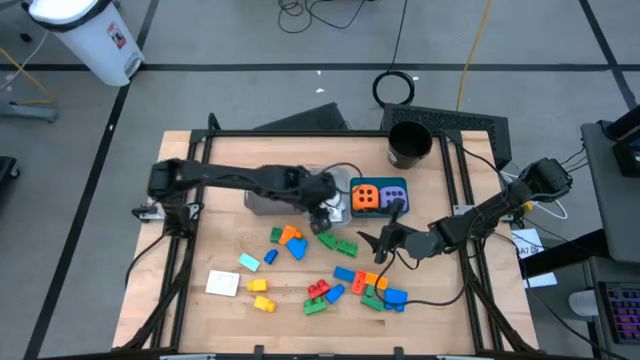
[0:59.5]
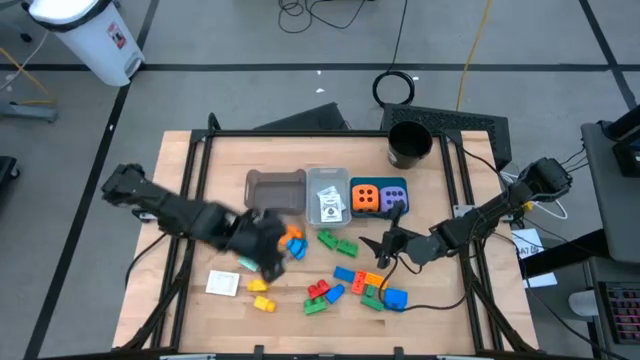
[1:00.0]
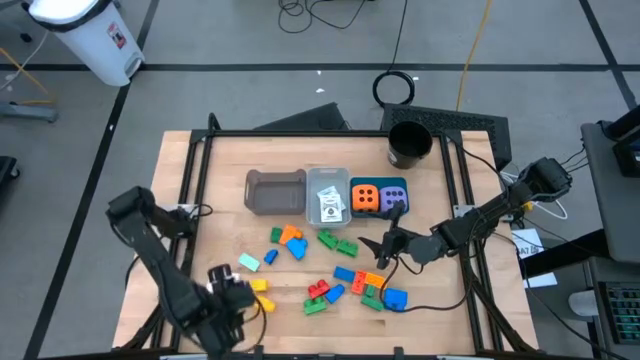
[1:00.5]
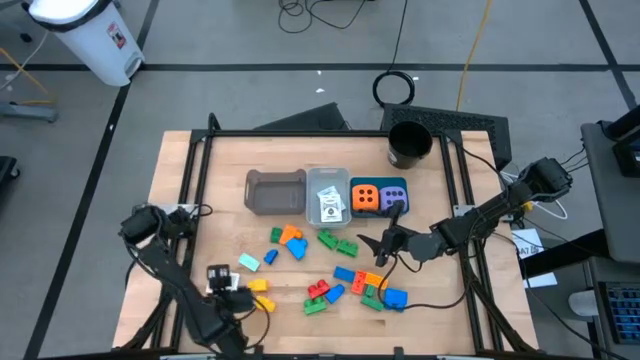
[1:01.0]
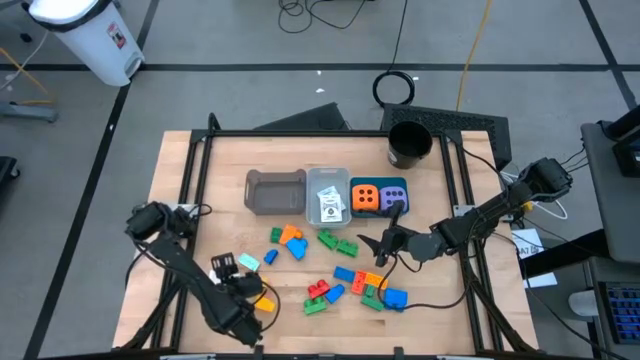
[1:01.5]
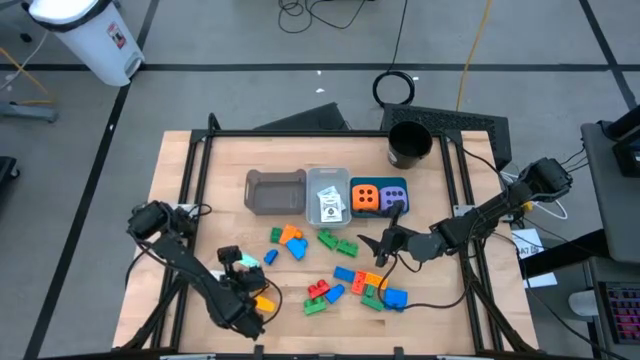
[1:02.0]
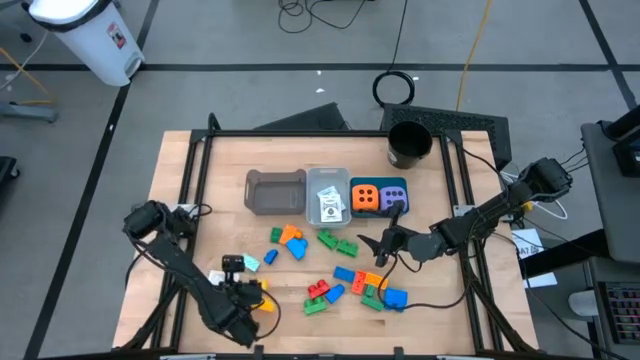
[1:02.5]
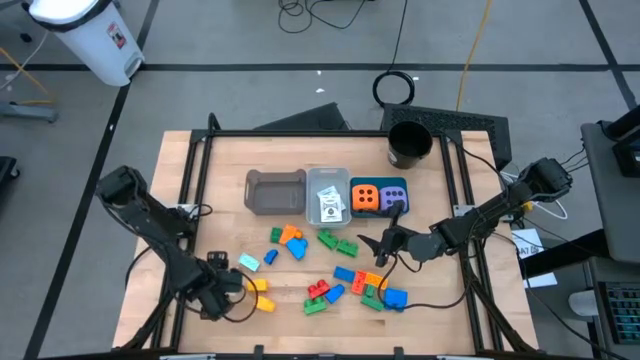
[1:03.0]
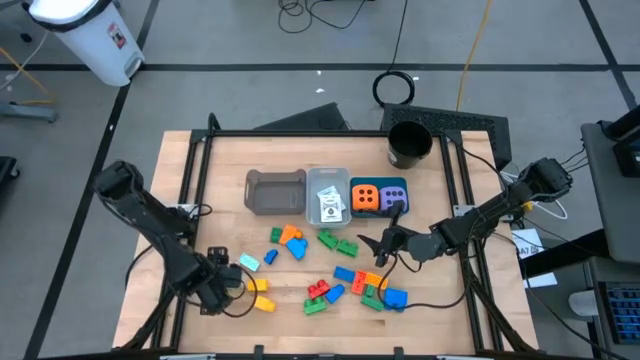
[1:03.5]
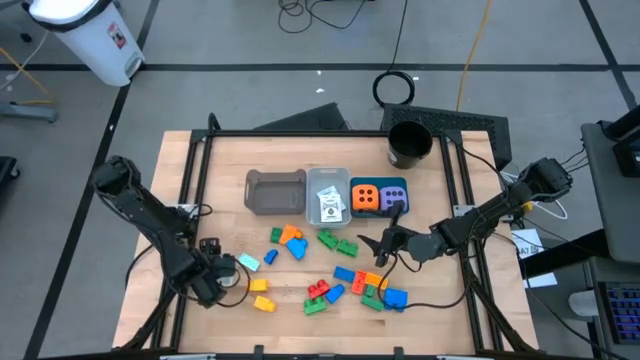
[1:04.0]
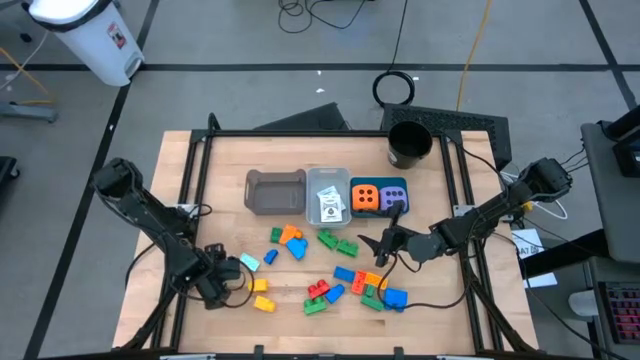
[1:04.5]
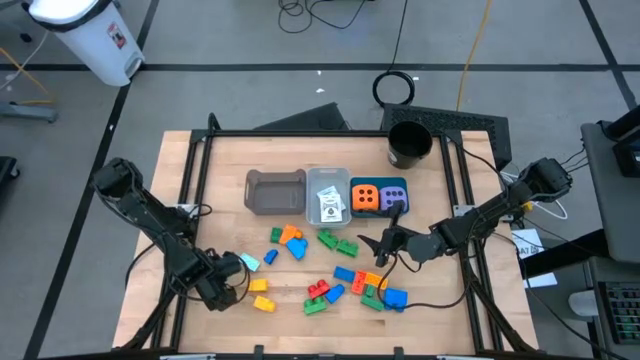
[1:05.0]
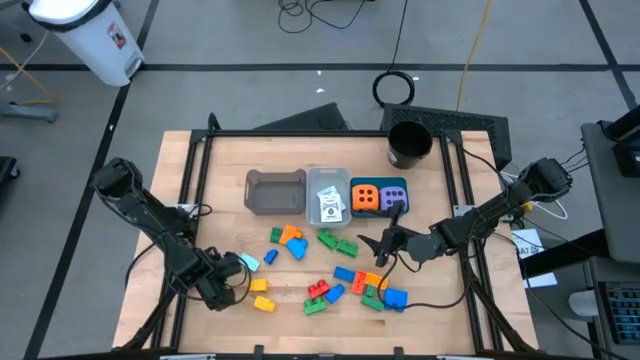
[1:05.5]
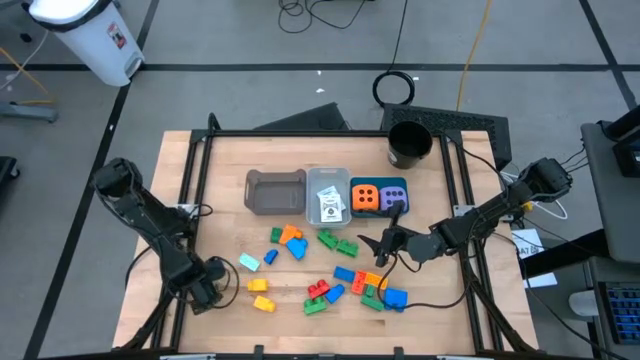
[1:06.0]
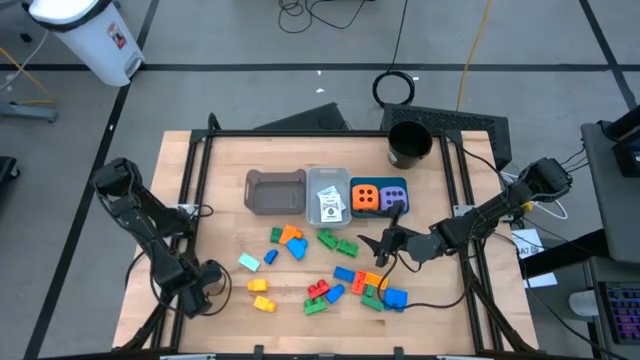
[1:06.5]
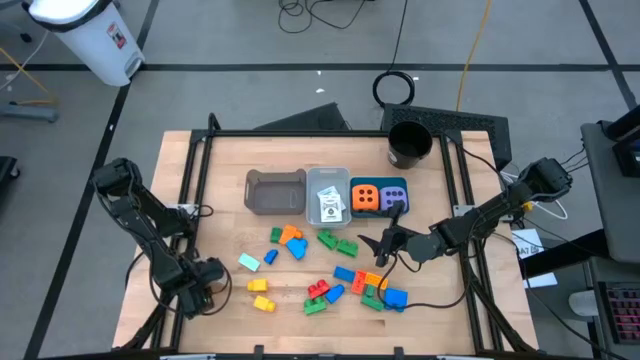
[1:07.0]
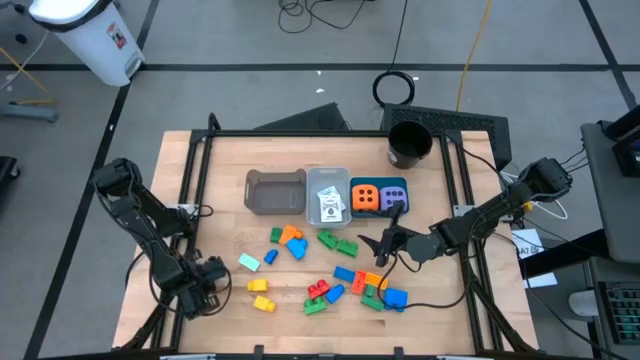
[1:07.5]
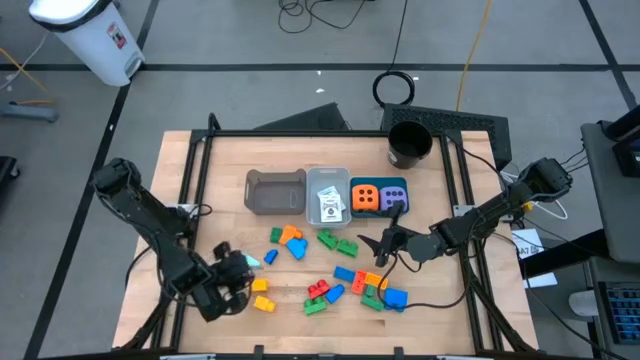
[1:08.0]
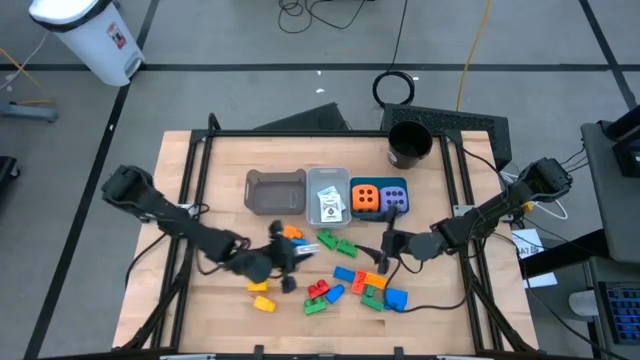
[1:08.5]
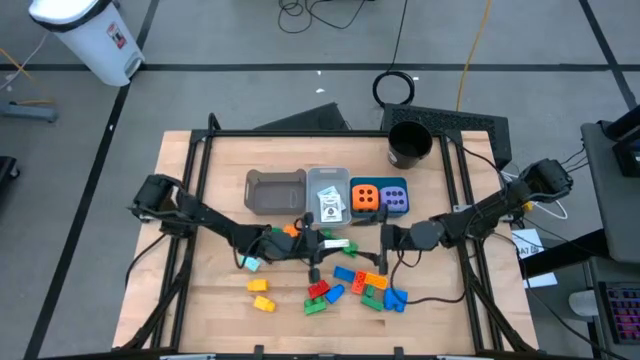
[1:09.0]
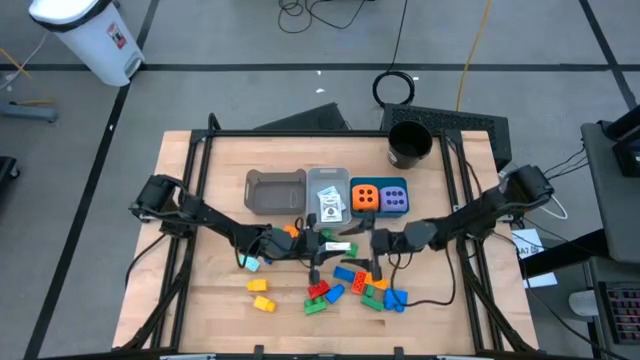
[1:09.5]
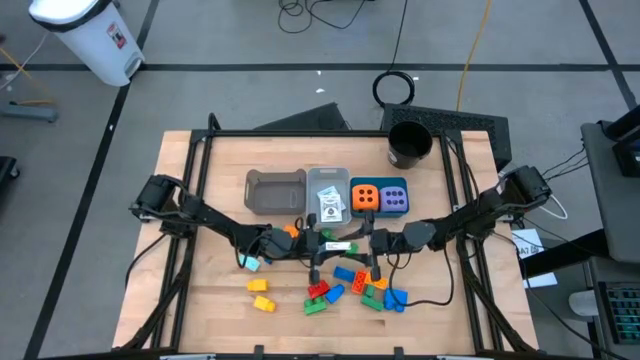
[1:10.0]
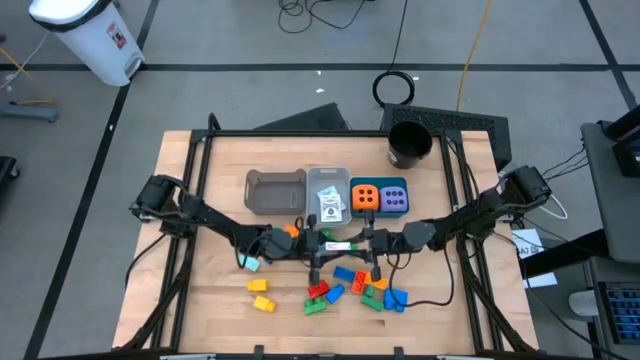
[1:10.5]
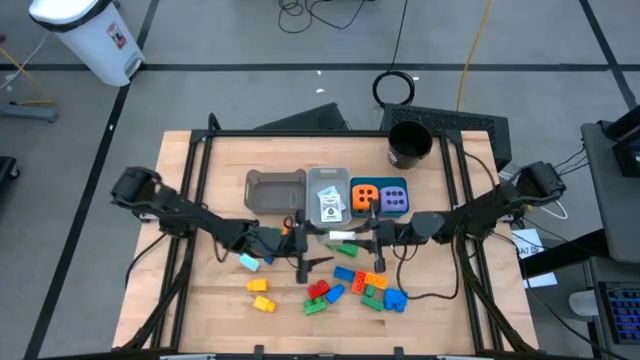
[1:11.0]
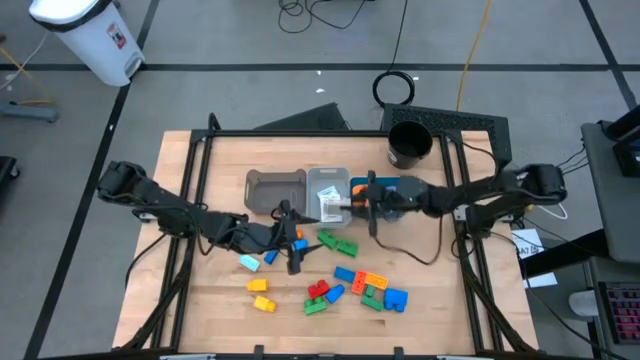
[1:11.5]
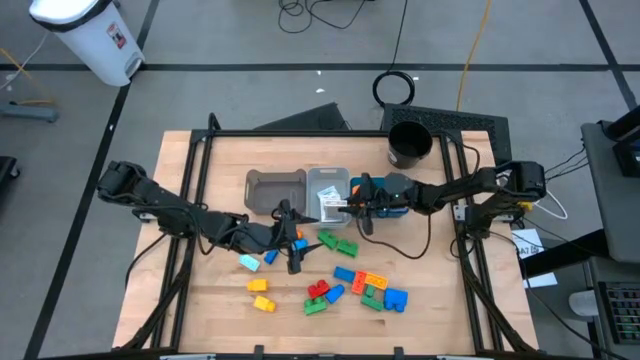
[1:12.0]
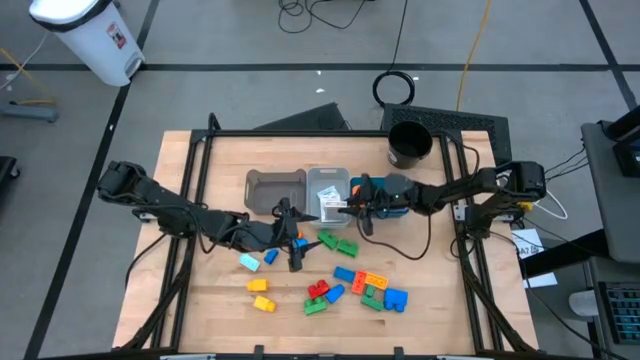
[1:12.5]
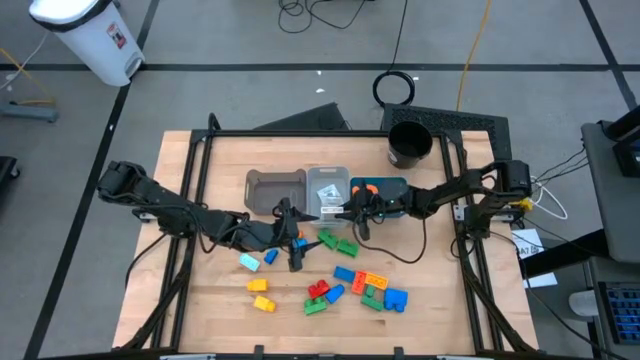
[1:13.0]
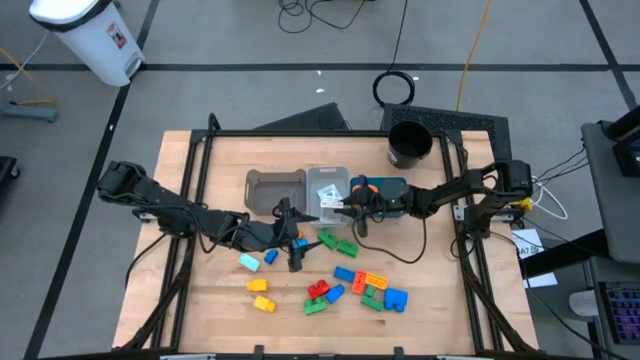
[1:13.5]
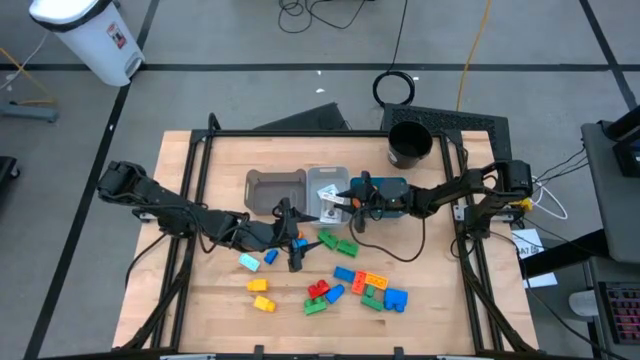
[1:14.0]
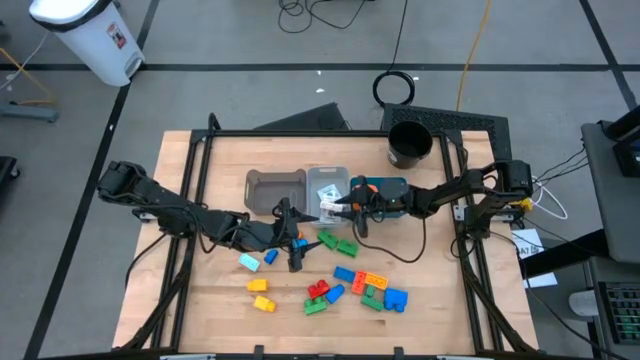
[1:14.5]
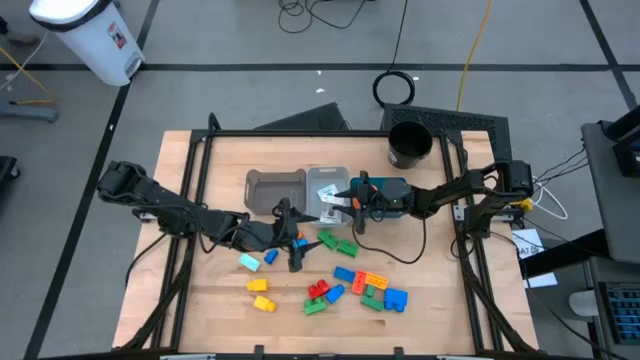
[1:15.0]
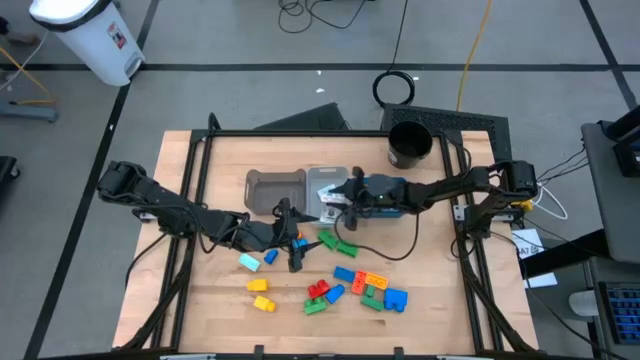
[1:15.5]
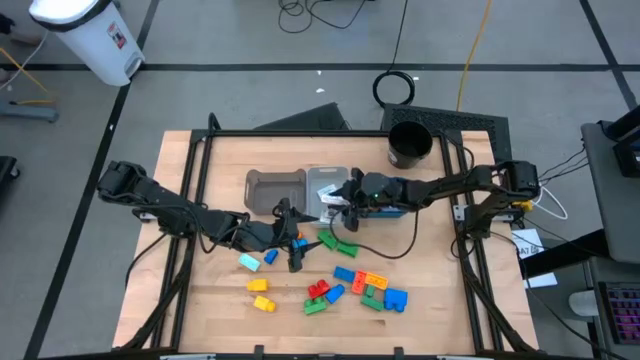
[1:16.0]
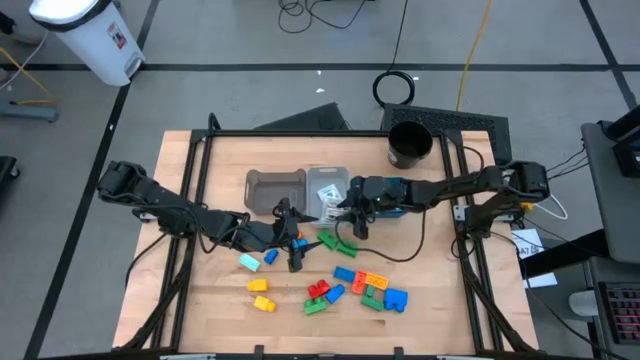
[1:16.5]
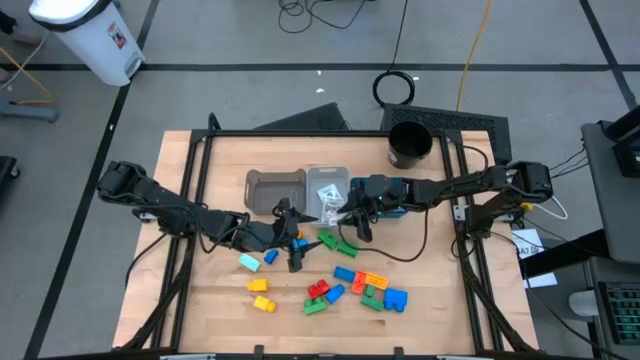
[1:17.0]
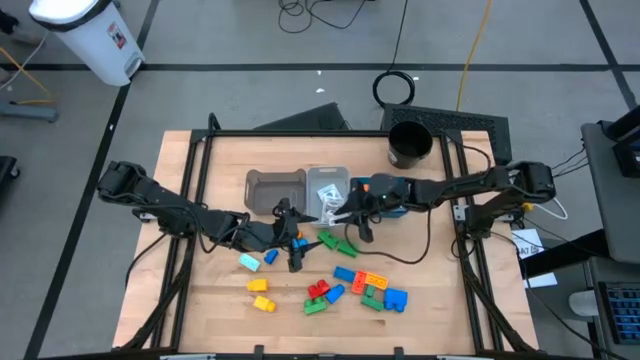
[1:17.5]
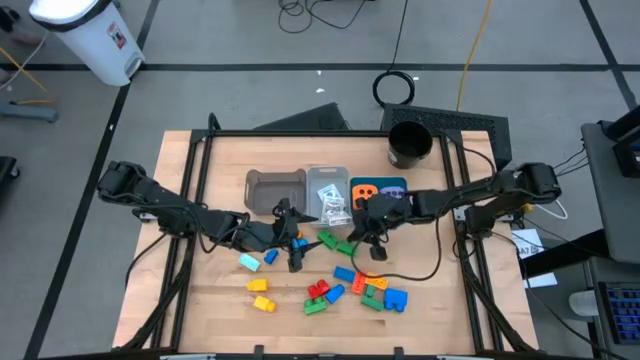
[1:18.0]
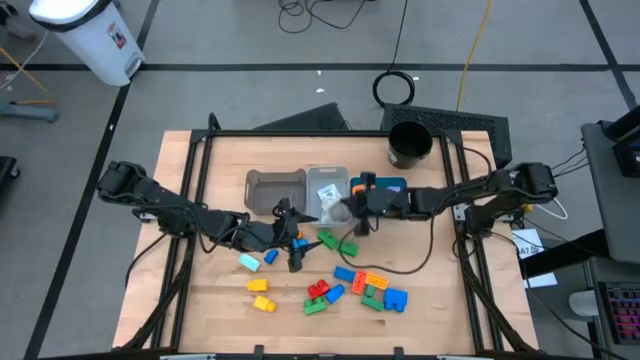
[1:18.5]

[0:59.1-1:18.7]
Task: Pick & Place Toys
Put the brown playing card box into the gray bin

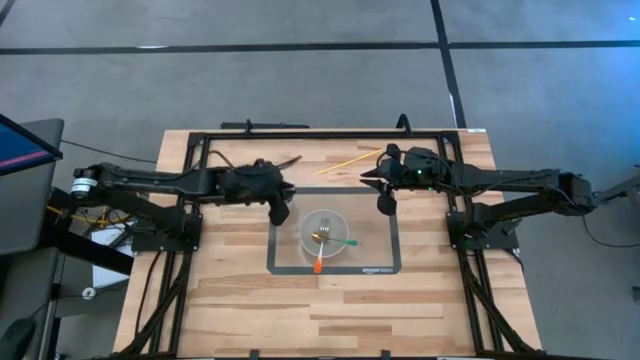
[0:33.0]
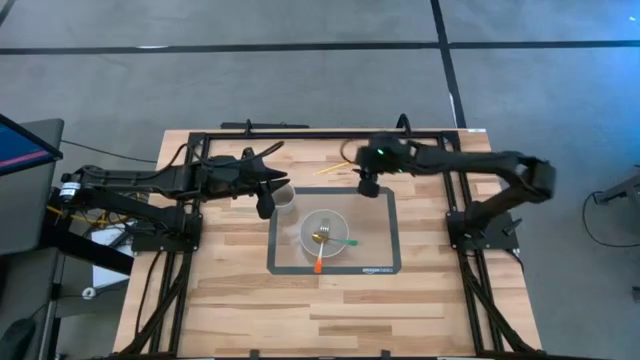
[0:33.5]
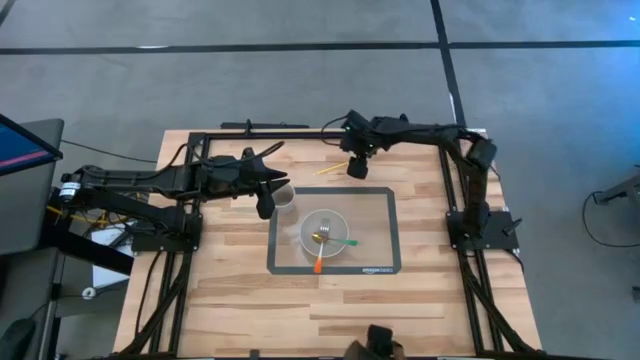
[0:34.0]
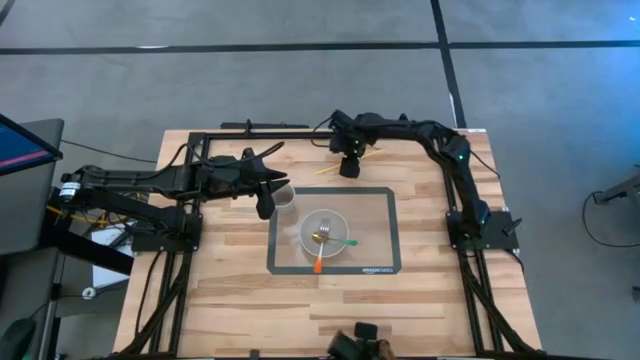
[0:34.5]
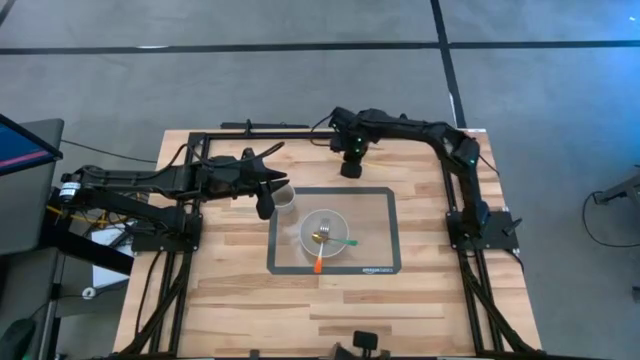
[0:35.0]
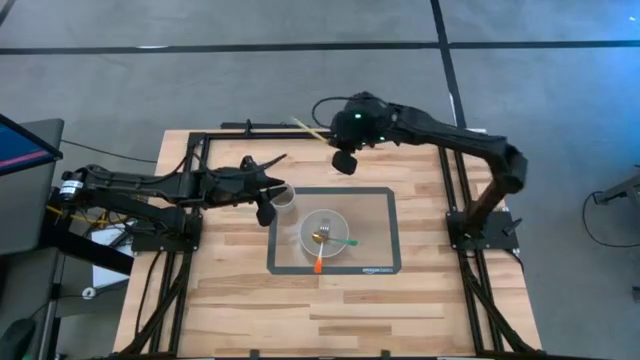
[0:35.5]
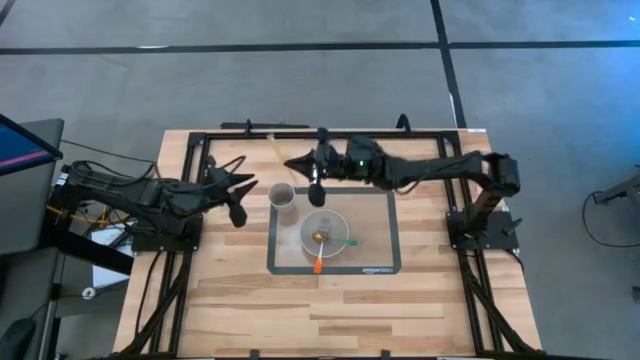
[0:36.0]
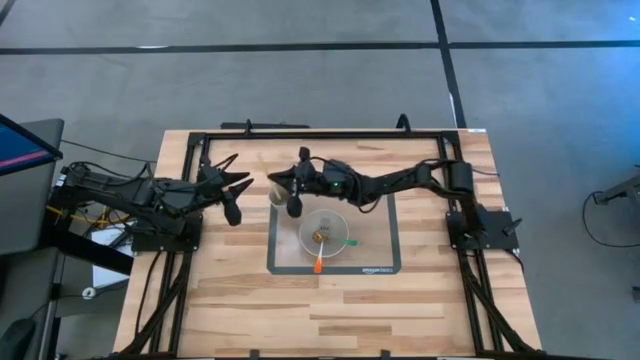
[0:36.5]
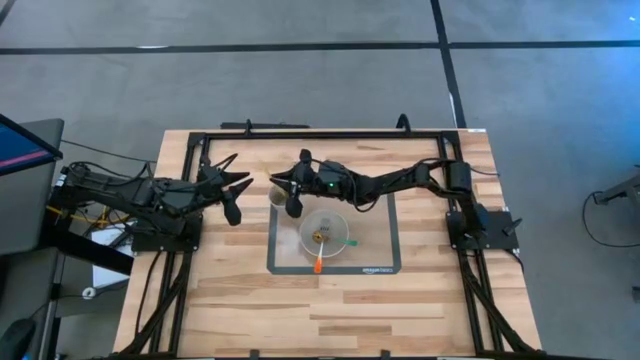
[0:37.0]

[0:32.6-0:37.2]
Task: Pick & Place Utensil
Put the yellow straw into the white cup
